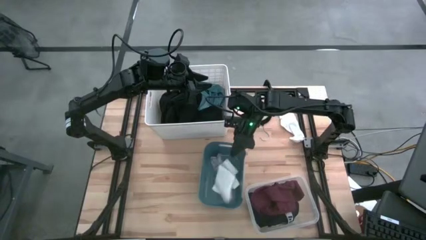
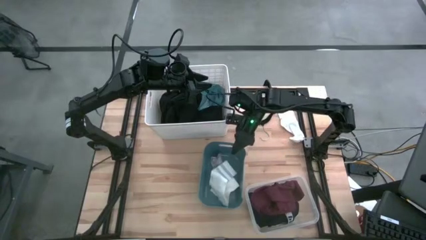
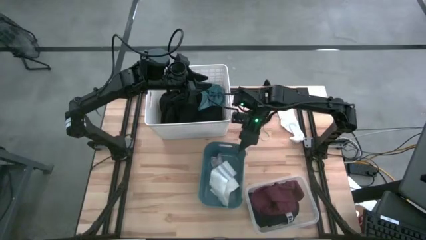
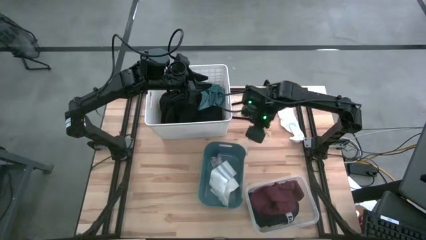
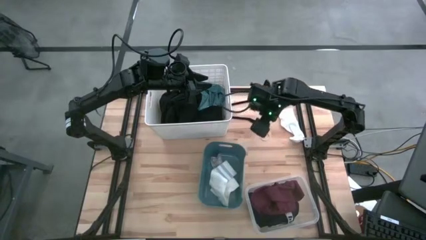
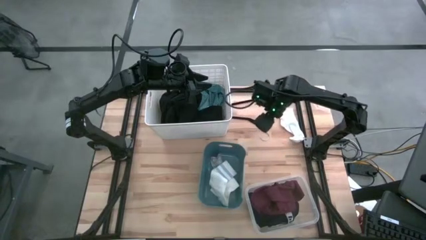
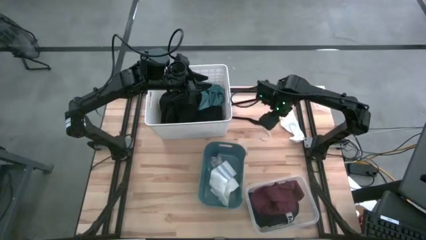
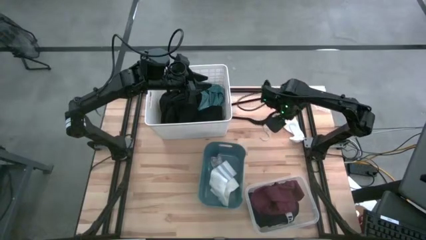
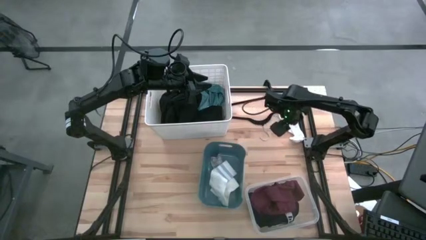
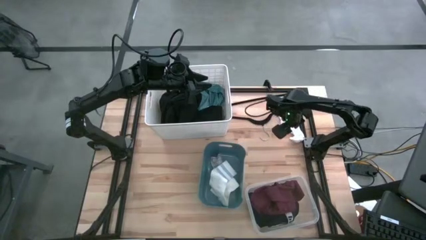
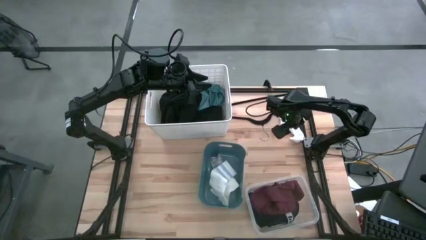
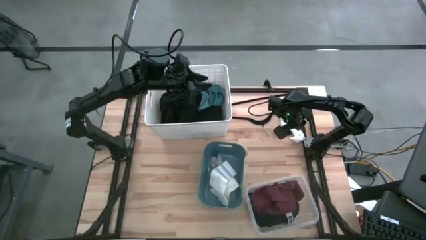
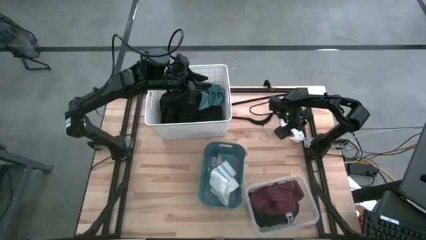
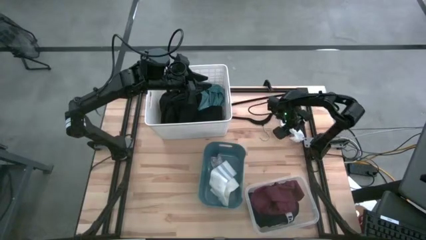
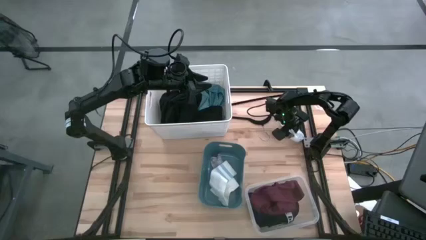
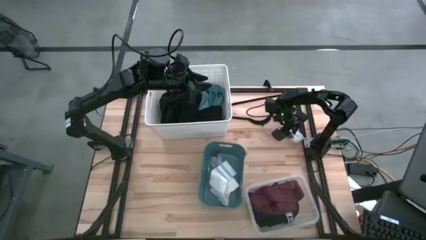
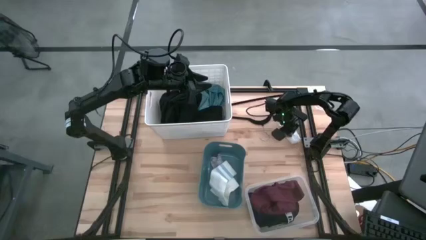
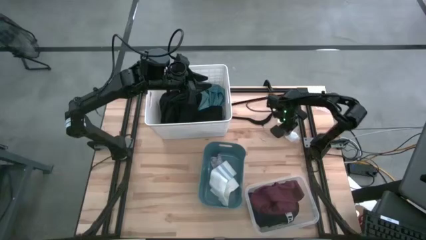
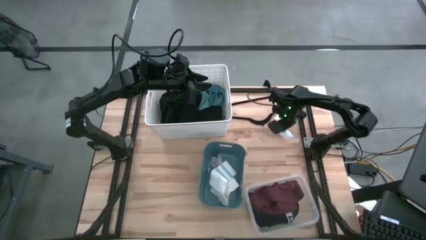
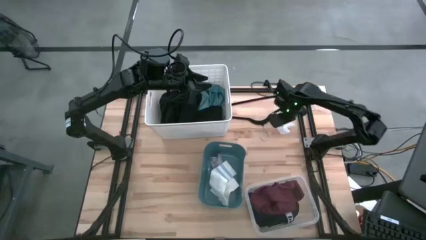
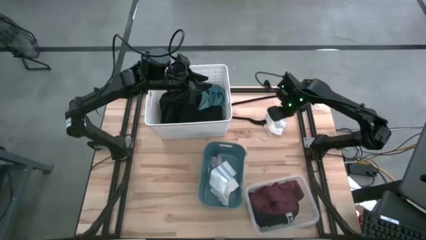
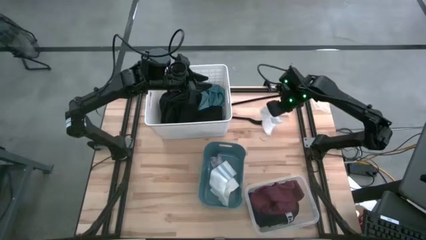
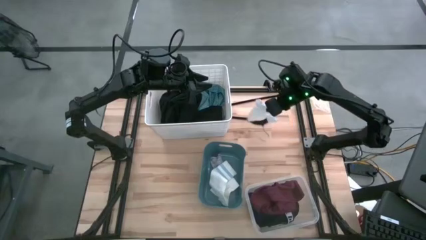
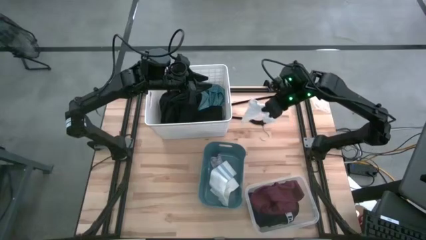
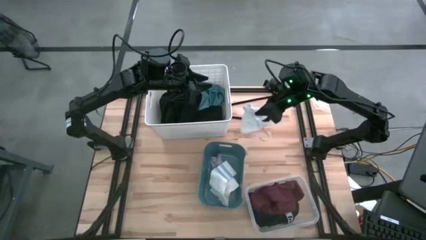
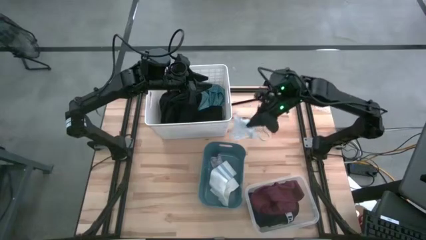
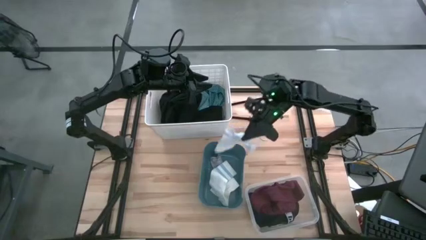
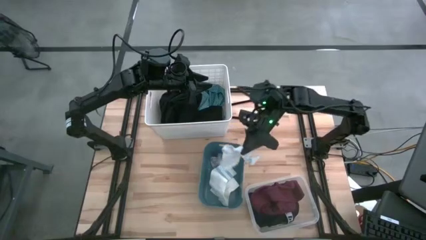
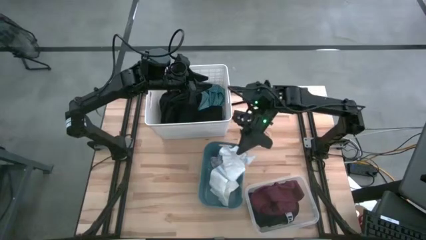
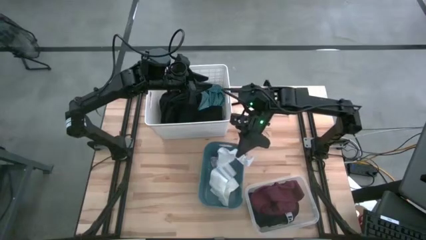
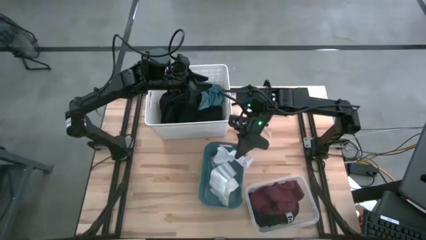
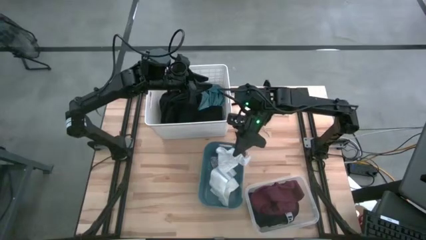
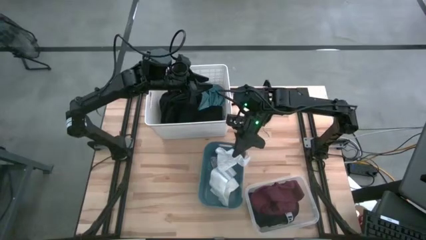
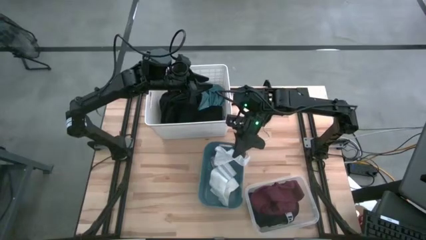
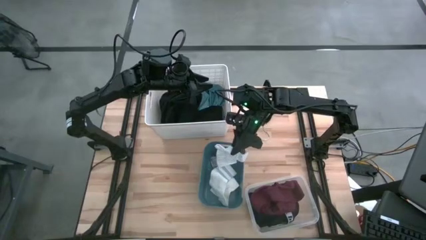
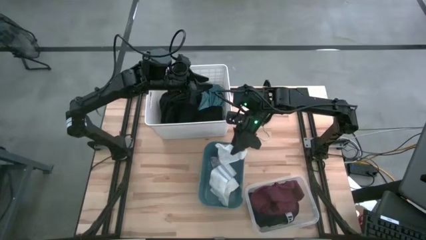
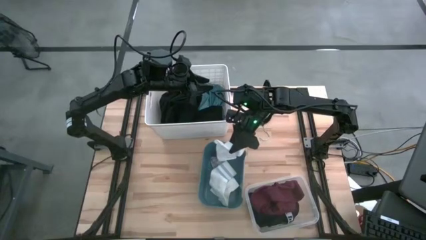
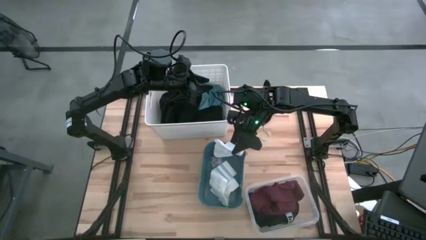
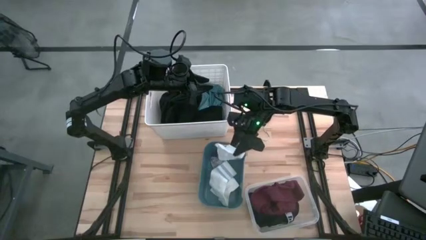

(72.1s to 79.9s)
Task: Pick & Place Cloths
Put the white sock into the blue bin

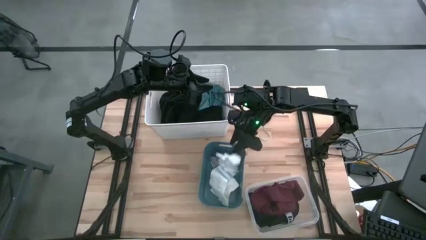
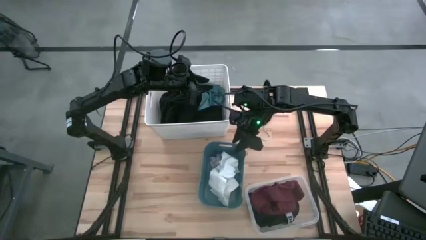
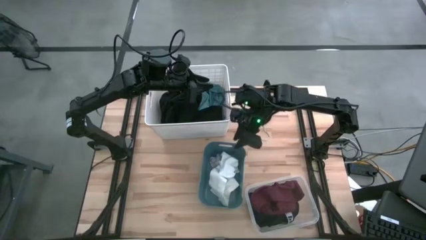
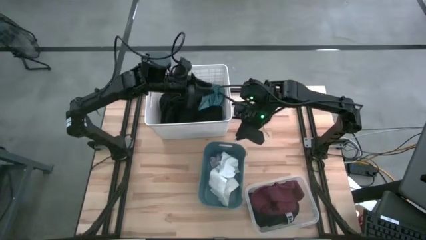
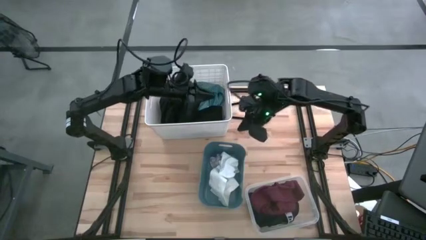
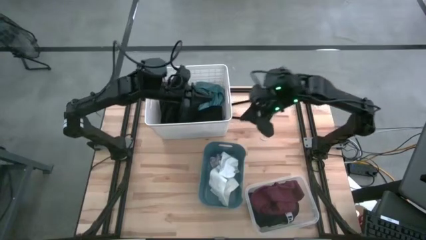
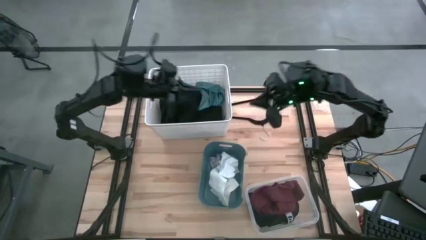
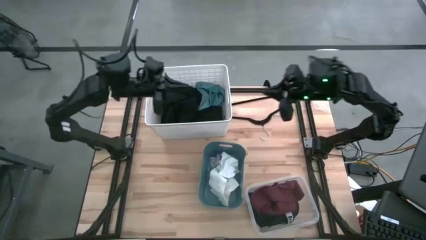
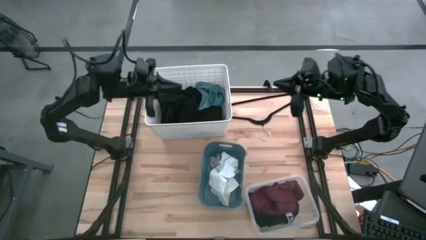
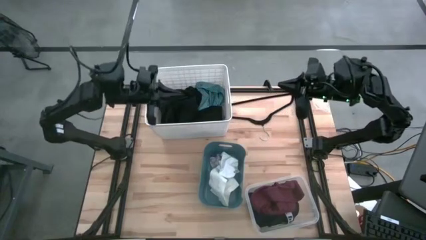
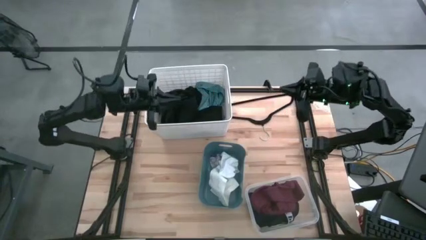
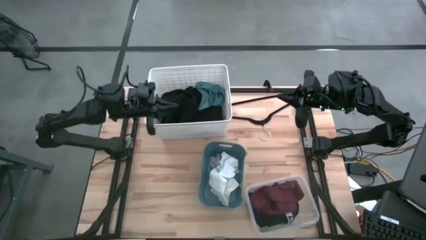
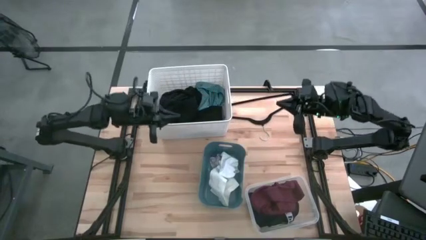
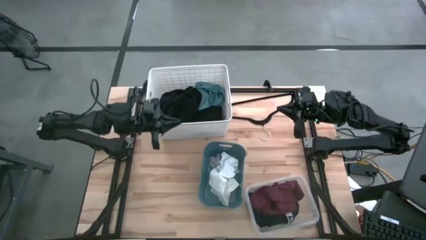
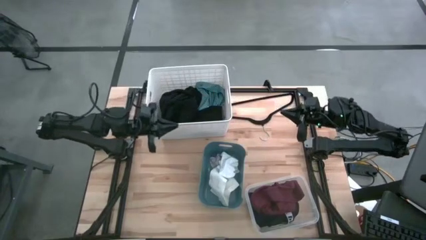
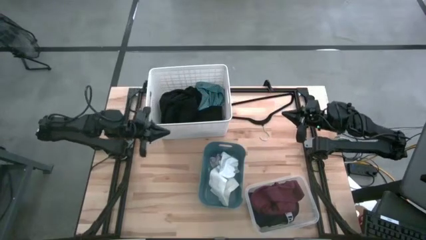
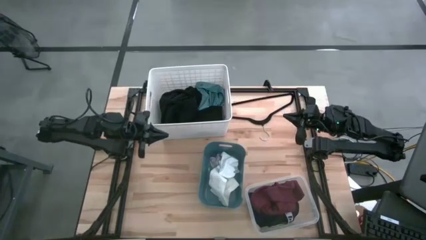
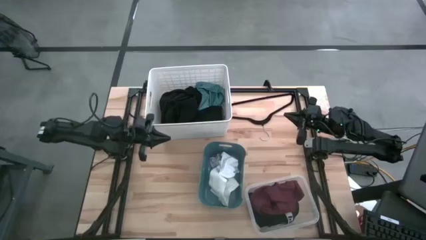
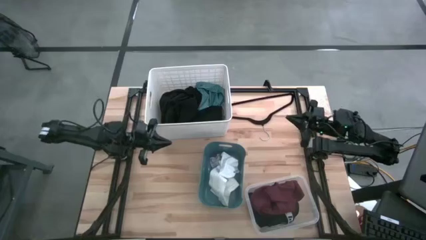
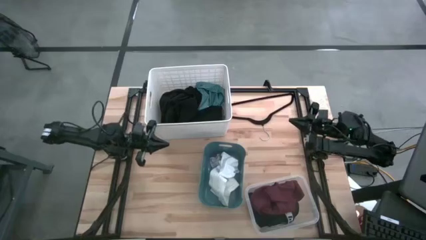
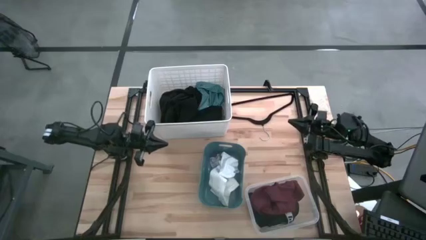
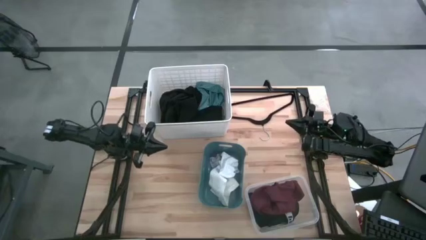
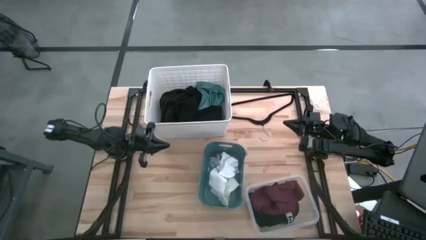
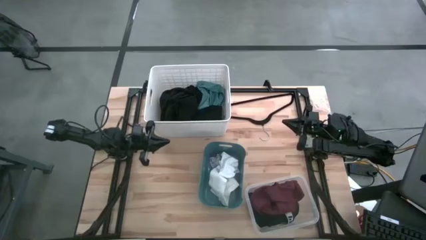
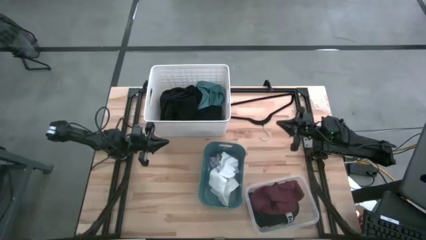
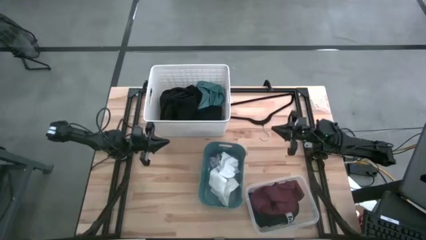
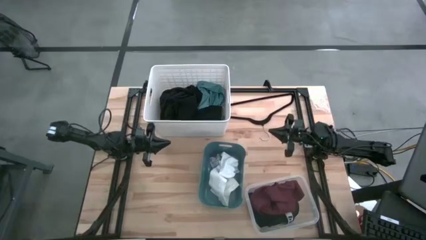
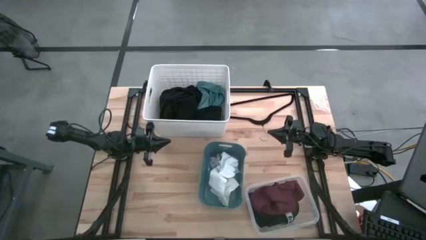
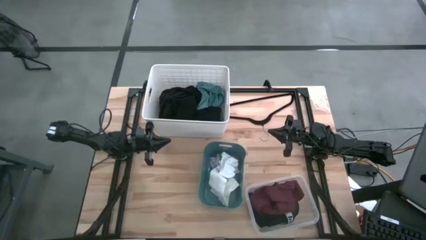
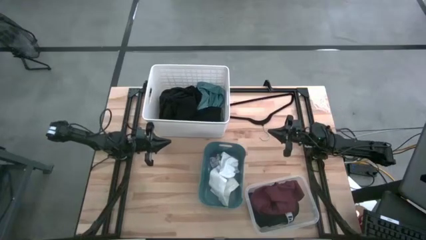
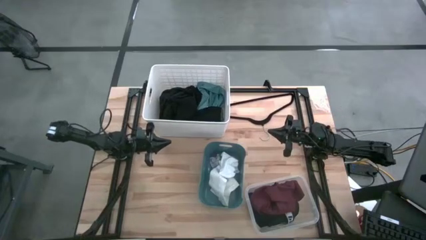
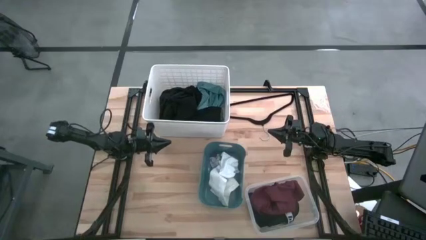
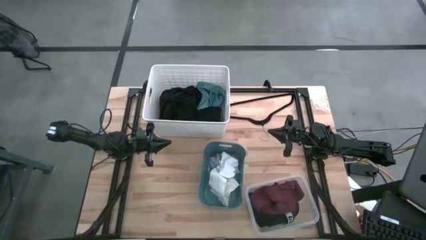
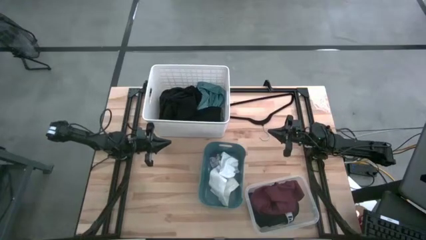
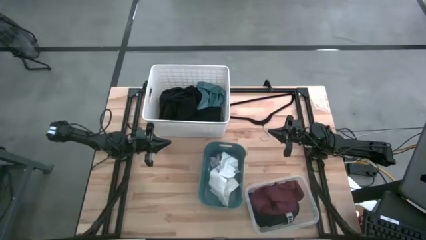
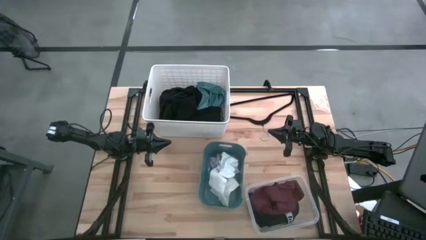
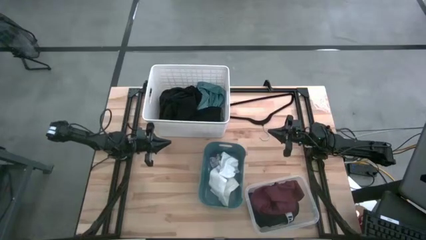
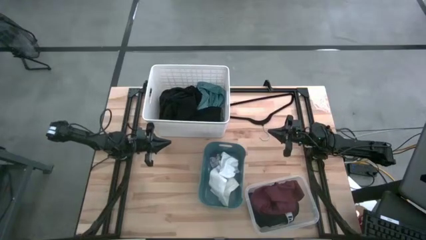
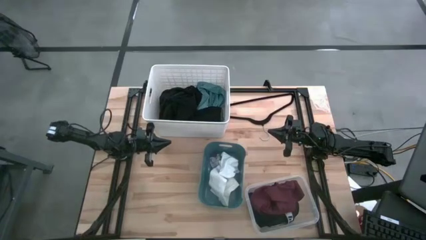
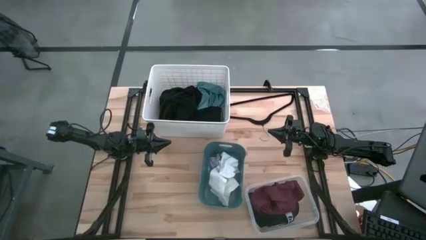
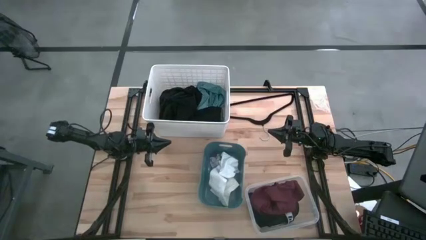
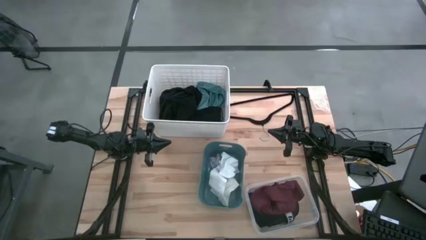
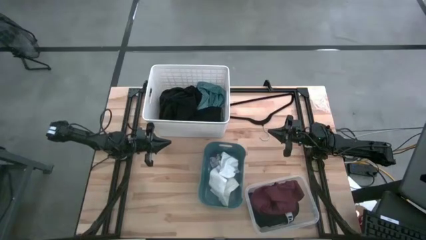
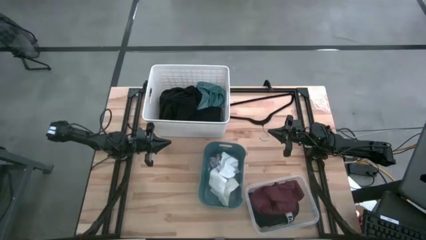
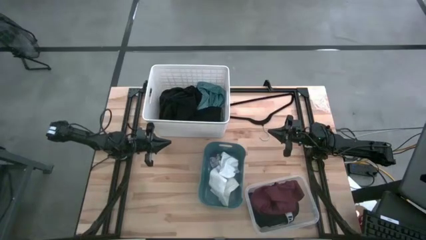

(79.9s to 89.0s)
Return to Home Position
